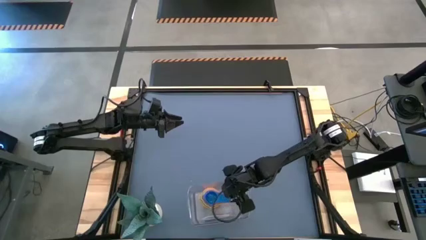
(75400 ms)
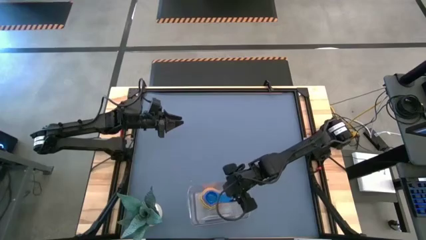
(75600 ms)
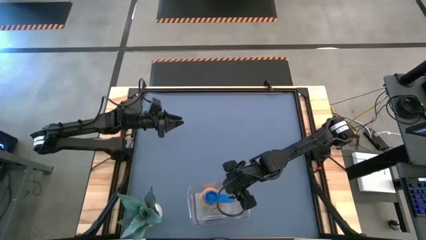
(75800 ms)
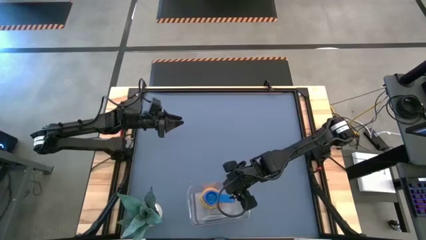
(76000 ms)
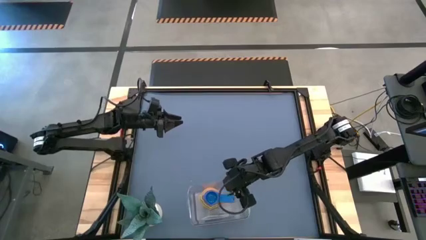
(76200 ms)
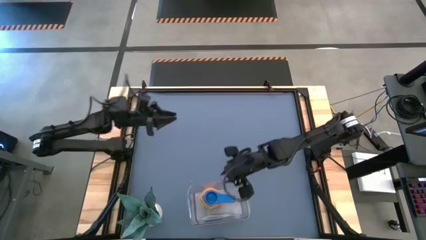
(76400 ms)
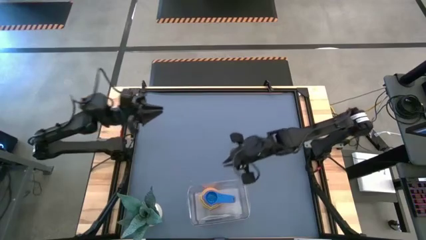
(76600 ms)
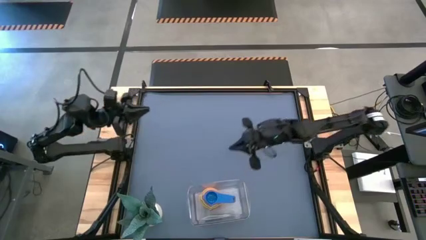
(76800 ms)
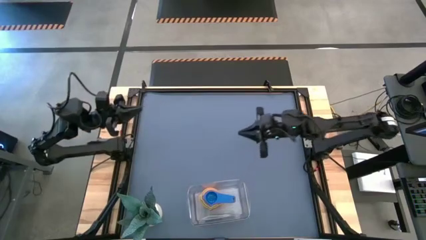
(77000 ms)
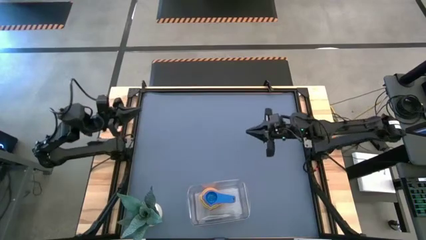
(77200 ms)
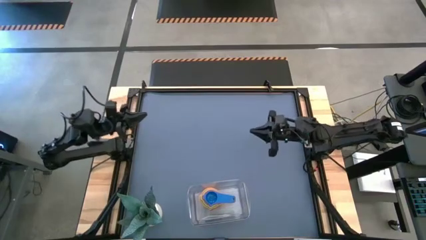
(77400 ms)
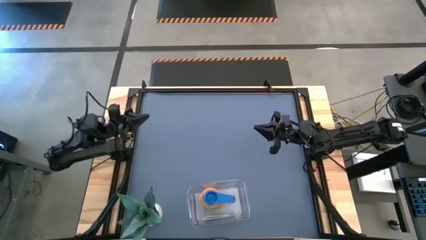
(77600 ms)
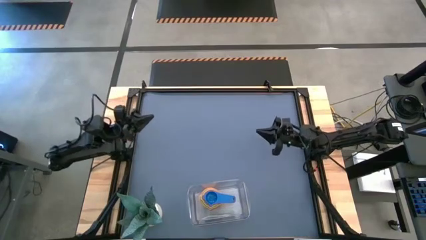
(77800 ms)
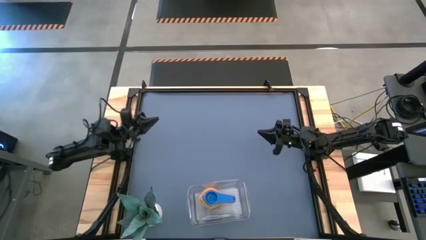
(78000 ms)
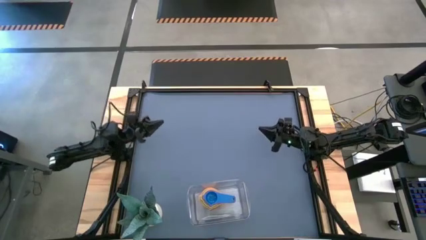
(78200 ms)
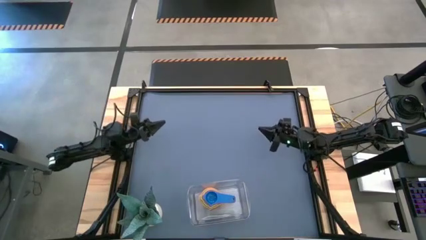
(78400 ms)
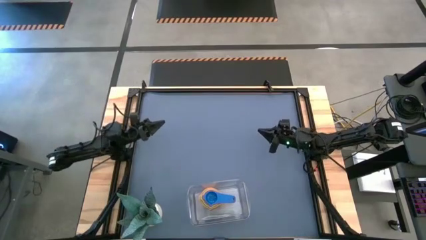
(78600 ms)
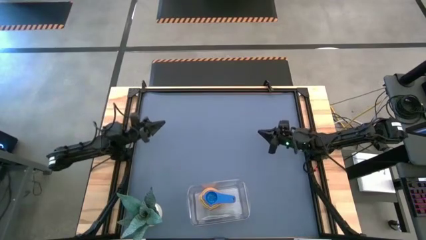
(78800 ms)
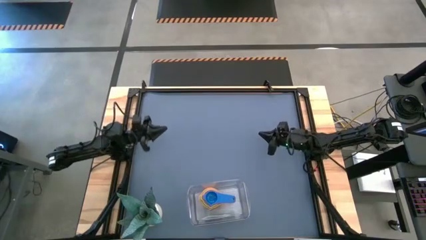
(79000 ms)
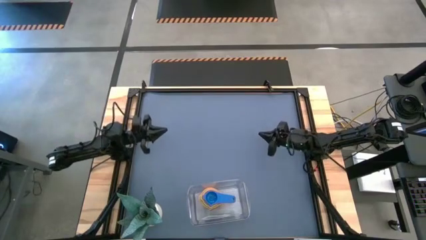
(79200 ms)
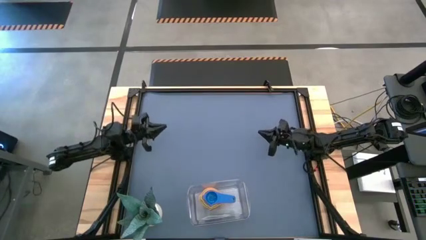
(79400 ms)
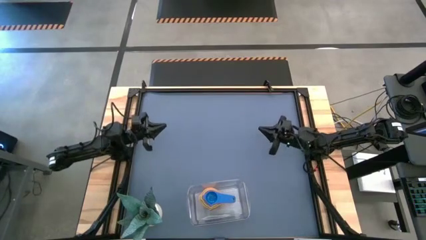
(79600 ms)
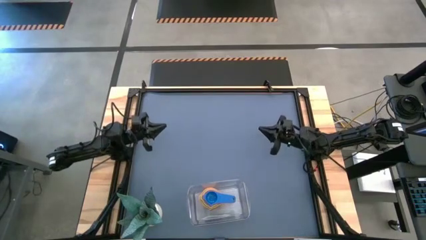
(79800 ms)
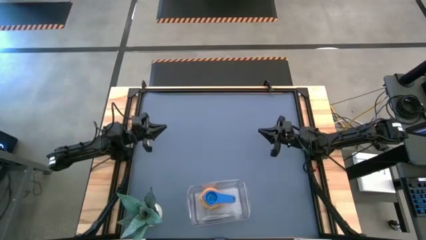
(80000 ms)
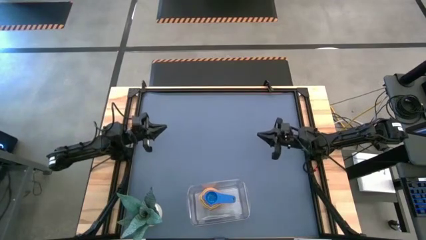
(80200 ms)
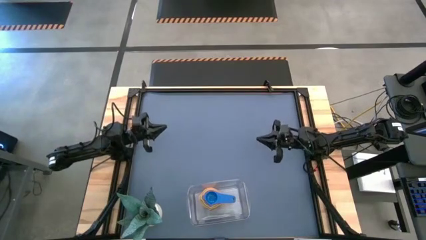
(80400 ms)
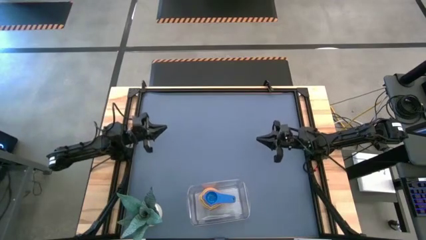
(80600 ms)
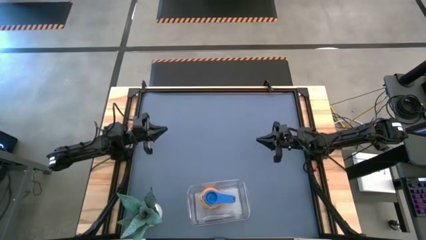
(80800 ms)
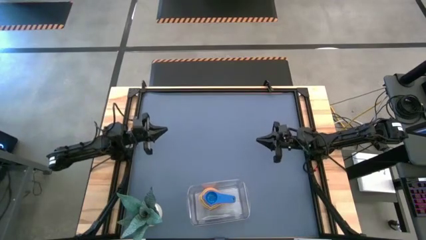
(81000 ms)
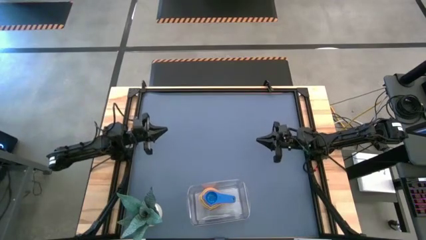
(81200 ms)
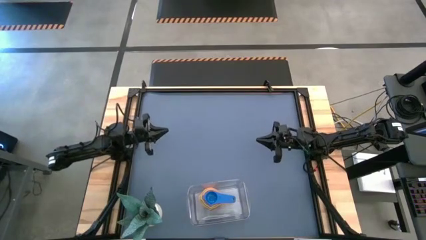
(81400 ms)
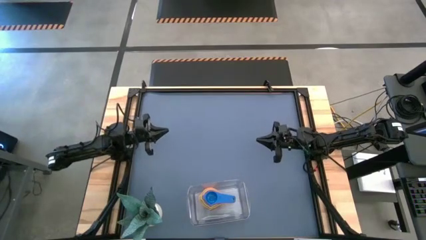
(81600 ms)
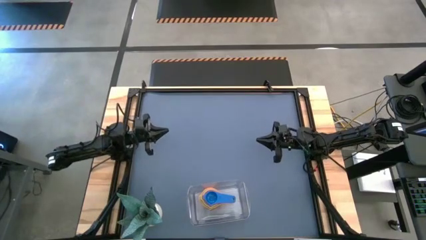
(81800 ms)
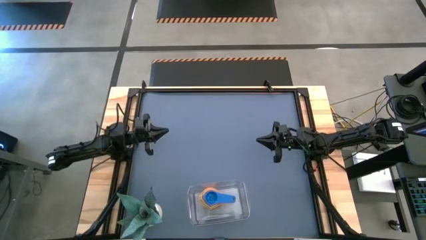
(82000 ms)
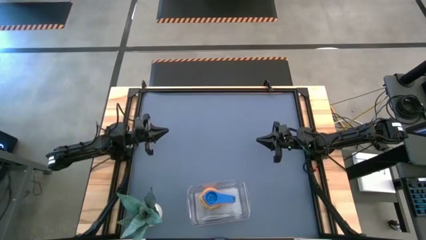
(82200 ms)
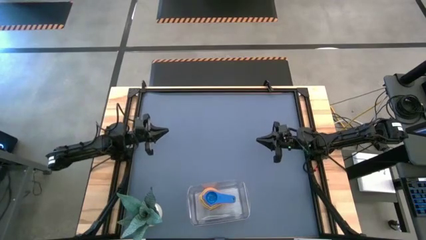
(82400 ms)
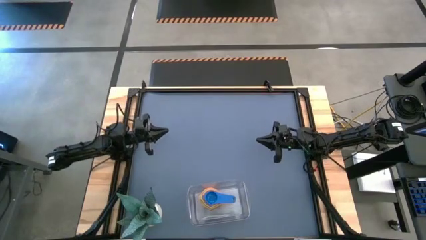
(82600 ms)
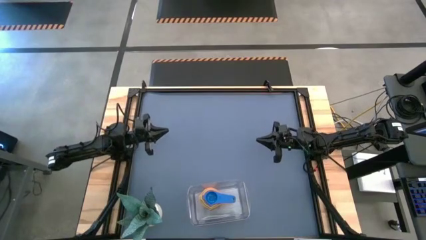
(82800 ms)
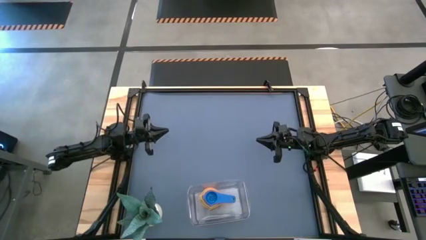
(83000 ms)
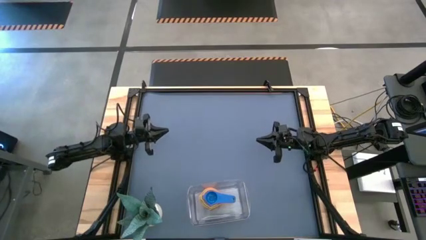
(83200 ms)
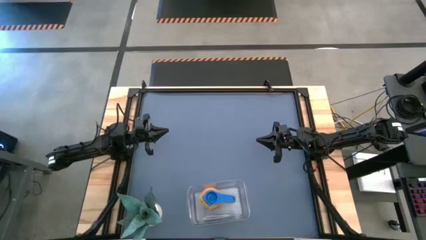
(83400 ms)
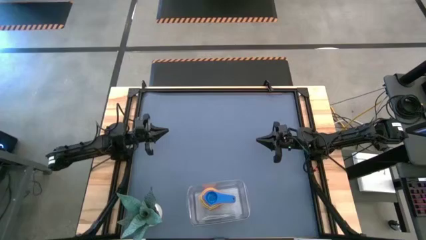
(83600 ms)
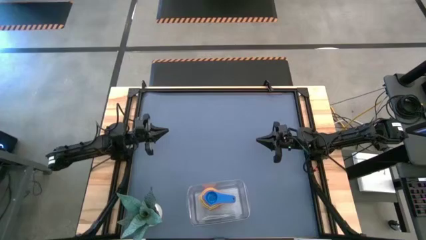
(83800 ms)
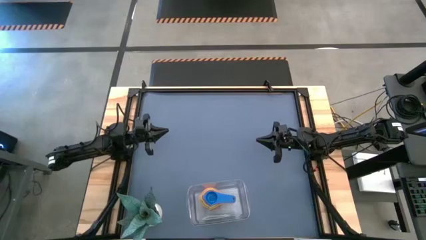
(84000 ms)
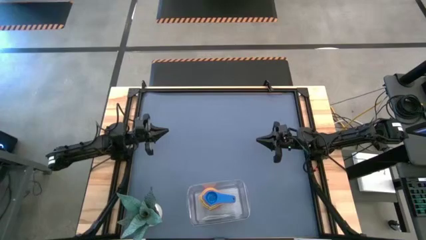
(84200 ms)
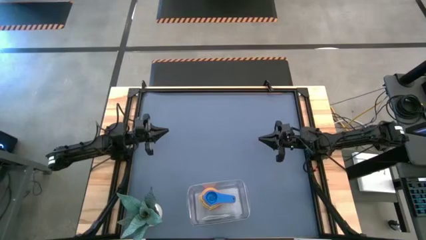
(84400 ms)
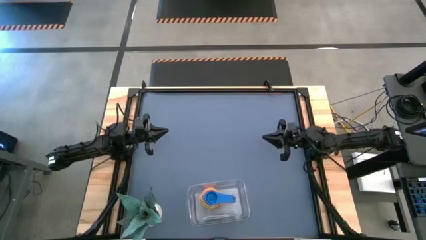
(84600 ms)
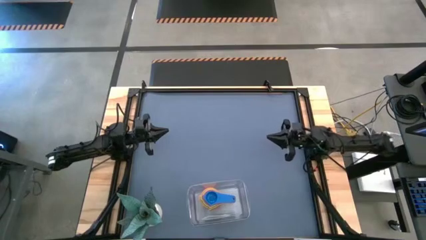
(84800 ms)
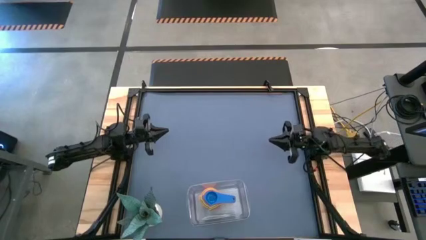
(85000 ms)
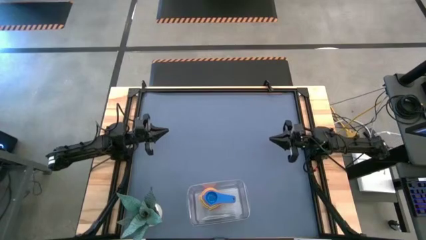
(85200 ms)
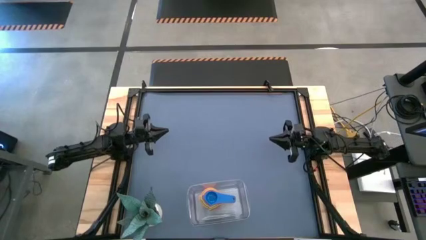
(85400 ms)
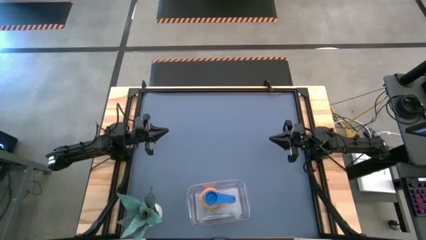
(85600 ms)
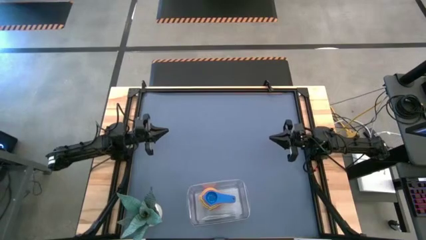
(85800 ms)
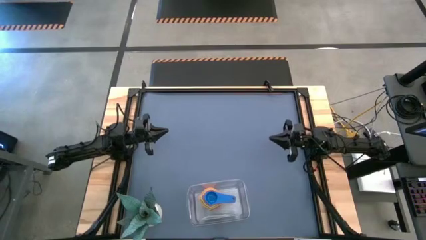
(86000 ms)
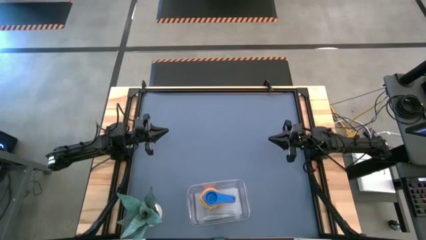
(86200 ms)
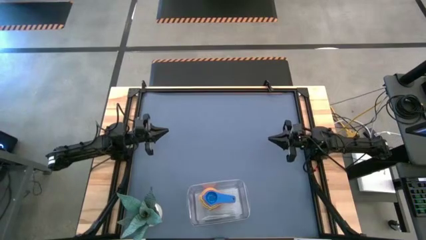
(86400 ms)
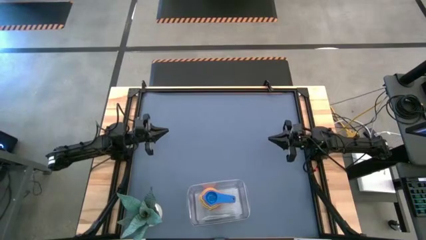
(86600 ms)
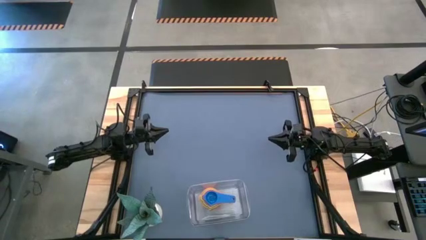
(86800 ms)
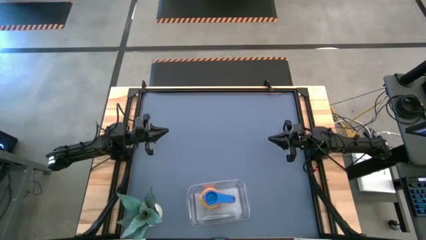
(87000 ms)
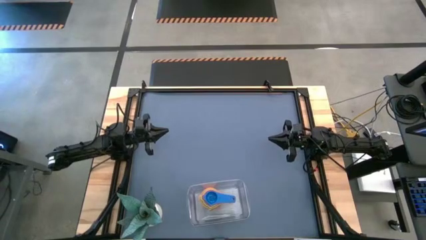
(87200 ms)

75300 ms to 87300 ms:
Task: Nest measuring cups in basket
Return to Home Position
